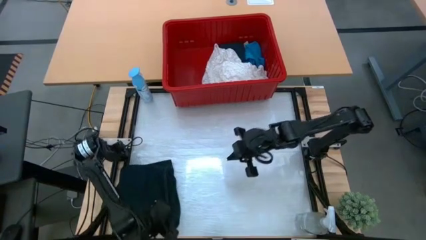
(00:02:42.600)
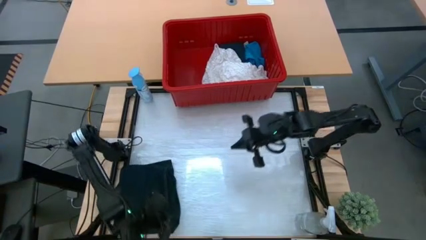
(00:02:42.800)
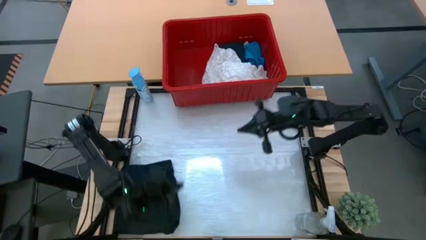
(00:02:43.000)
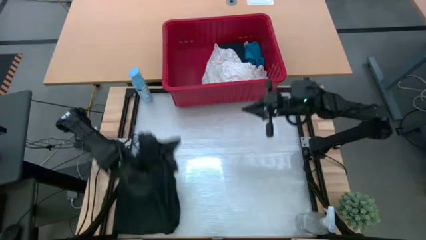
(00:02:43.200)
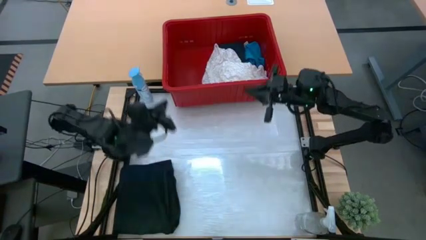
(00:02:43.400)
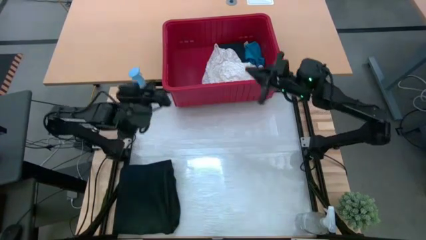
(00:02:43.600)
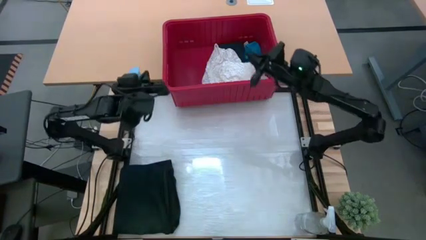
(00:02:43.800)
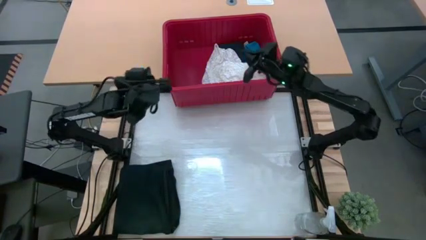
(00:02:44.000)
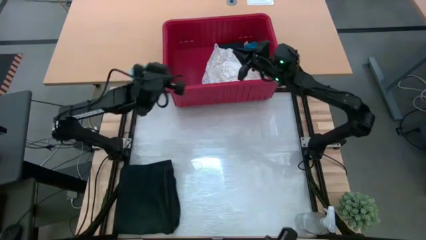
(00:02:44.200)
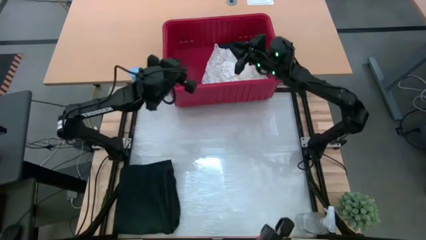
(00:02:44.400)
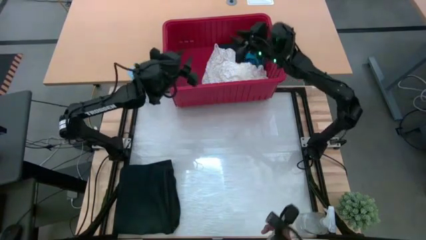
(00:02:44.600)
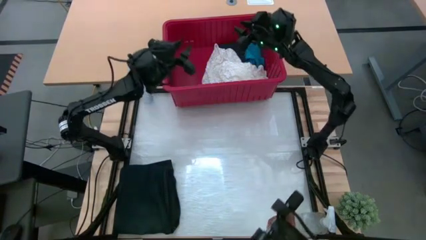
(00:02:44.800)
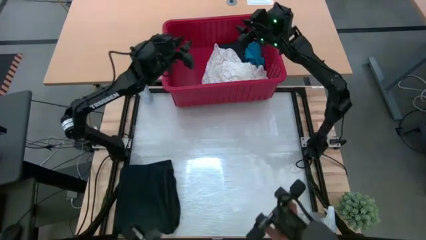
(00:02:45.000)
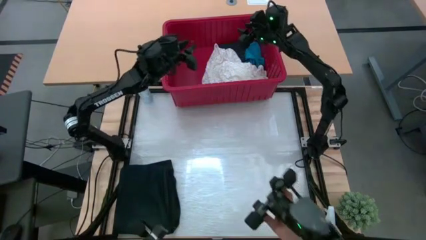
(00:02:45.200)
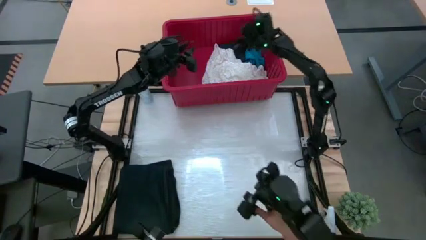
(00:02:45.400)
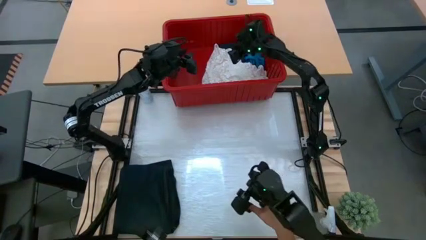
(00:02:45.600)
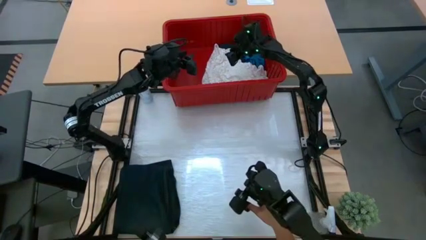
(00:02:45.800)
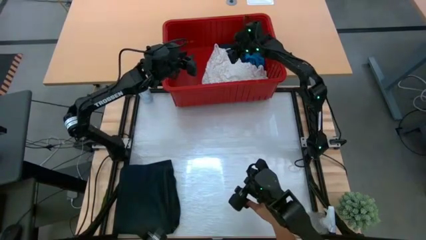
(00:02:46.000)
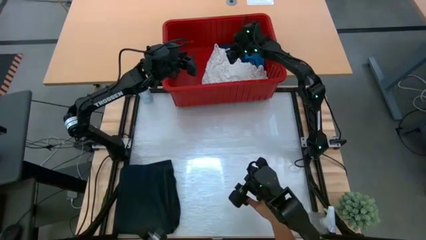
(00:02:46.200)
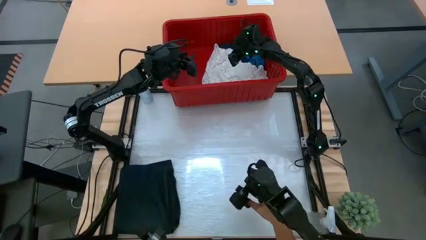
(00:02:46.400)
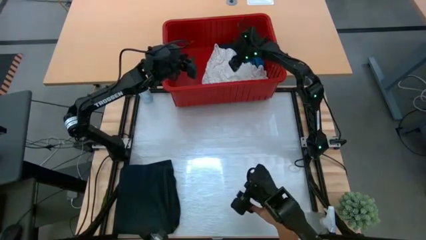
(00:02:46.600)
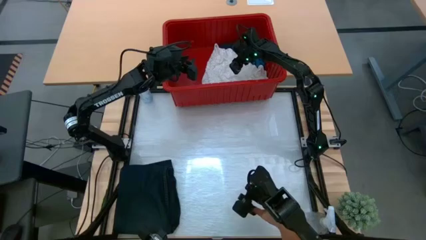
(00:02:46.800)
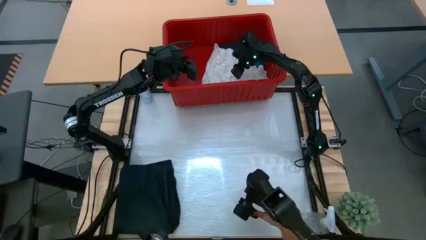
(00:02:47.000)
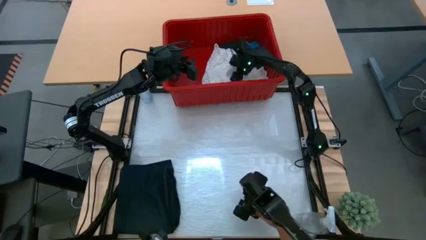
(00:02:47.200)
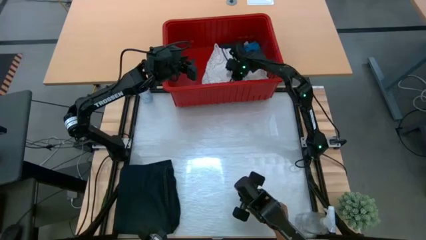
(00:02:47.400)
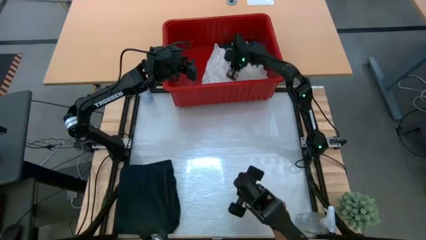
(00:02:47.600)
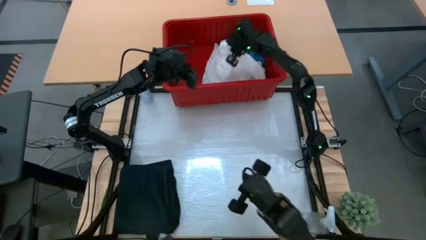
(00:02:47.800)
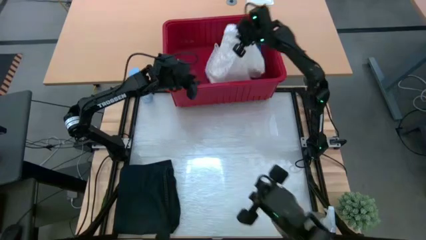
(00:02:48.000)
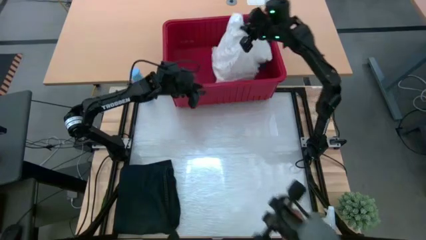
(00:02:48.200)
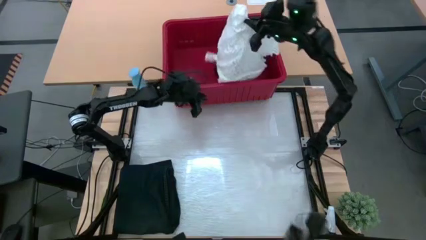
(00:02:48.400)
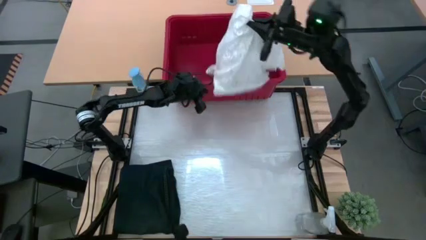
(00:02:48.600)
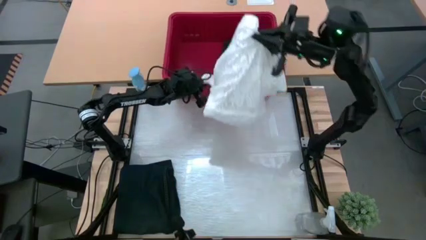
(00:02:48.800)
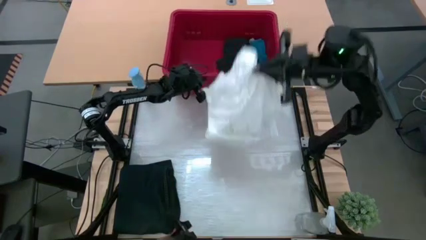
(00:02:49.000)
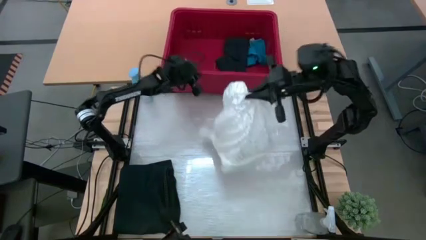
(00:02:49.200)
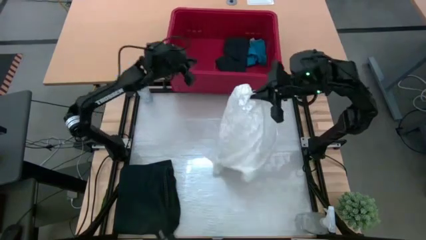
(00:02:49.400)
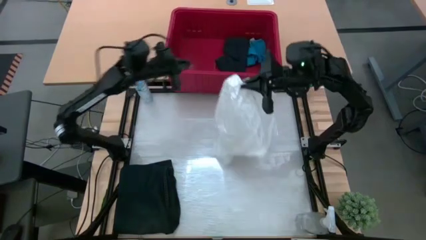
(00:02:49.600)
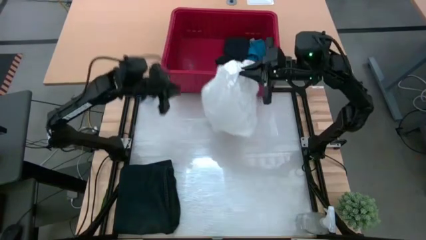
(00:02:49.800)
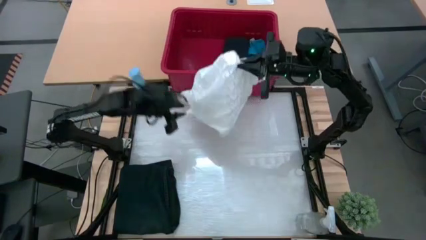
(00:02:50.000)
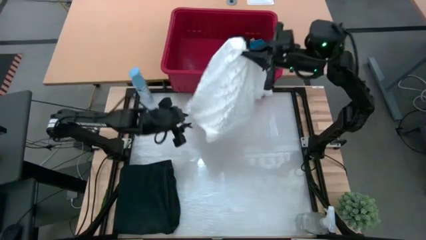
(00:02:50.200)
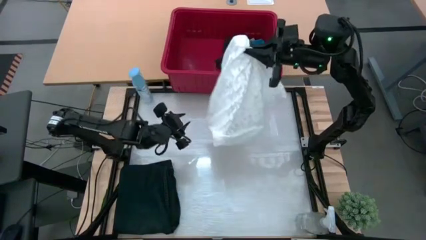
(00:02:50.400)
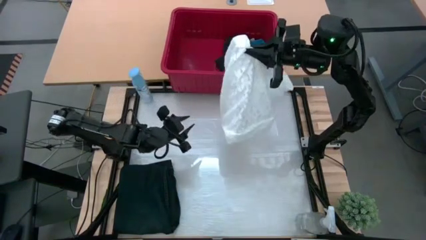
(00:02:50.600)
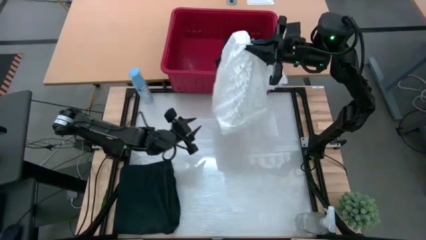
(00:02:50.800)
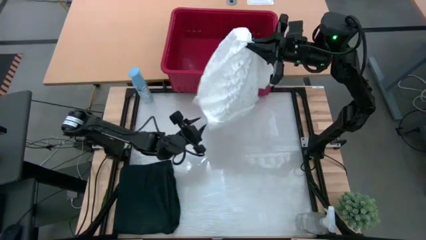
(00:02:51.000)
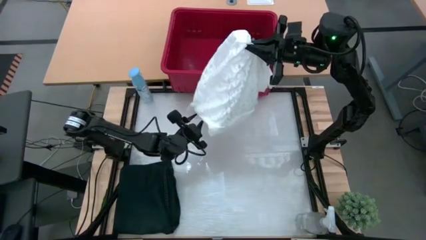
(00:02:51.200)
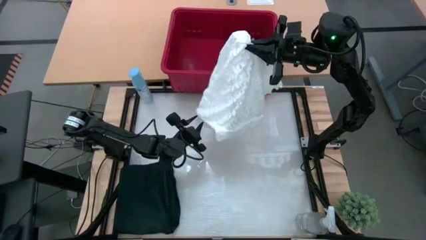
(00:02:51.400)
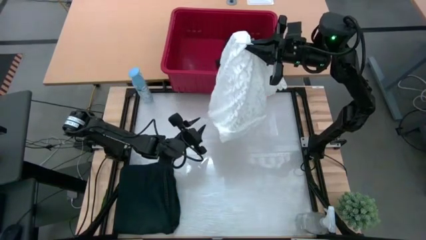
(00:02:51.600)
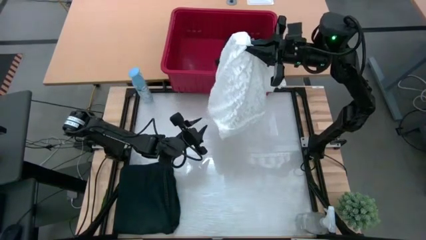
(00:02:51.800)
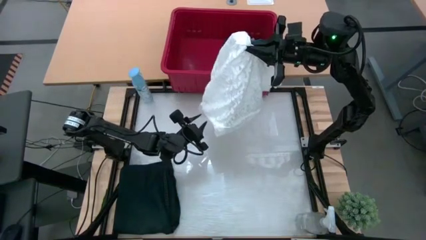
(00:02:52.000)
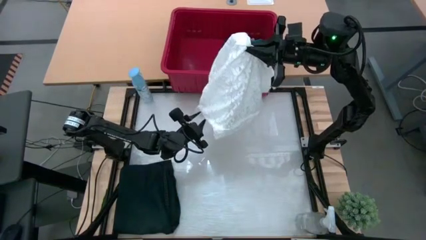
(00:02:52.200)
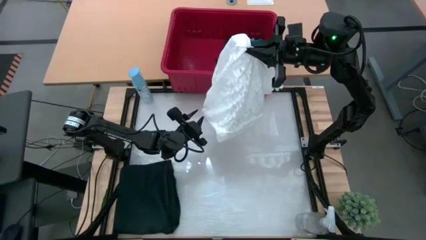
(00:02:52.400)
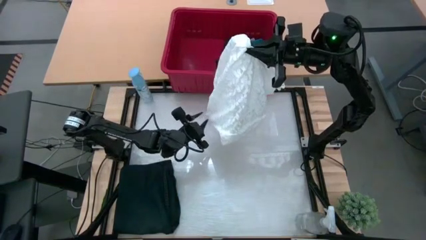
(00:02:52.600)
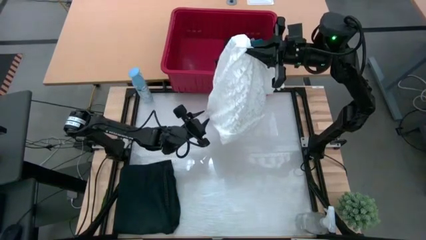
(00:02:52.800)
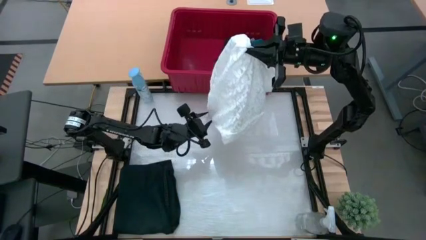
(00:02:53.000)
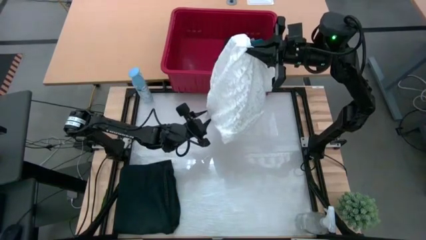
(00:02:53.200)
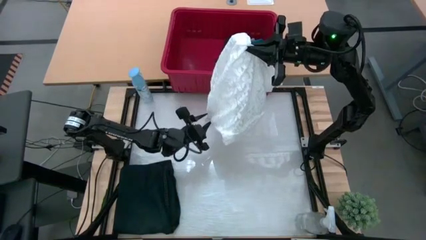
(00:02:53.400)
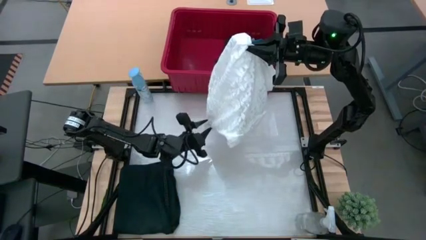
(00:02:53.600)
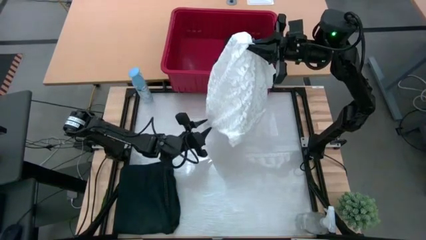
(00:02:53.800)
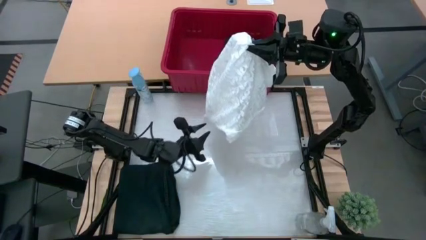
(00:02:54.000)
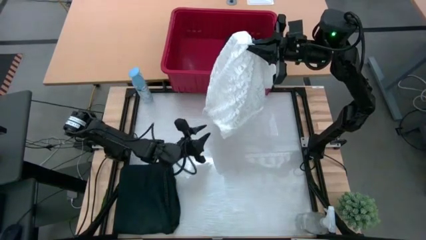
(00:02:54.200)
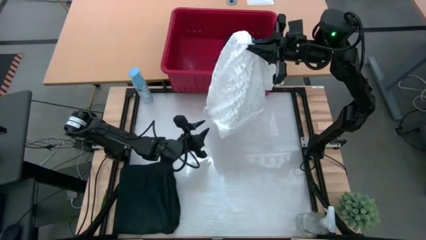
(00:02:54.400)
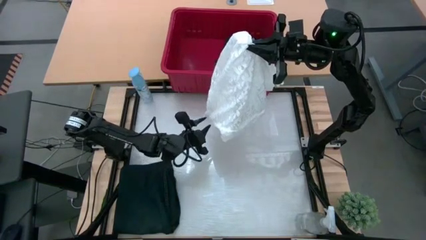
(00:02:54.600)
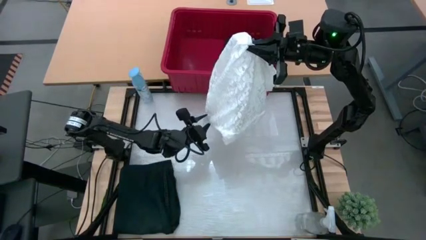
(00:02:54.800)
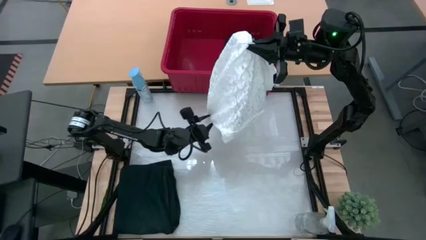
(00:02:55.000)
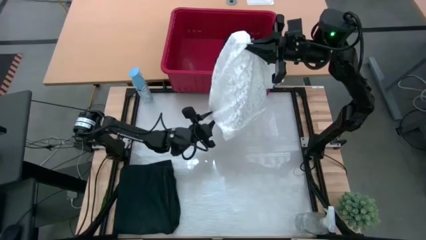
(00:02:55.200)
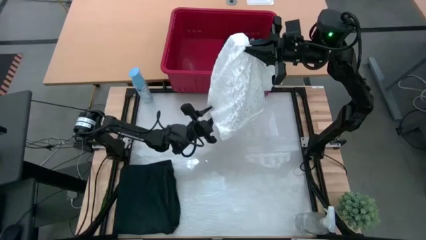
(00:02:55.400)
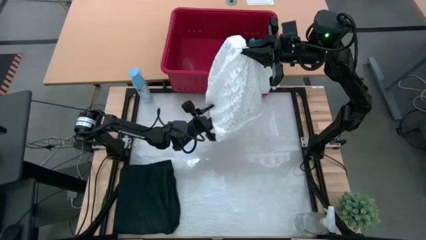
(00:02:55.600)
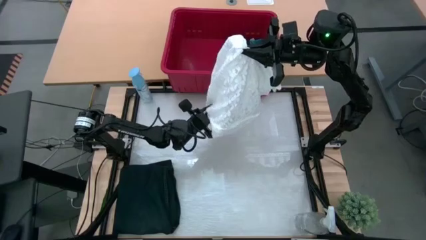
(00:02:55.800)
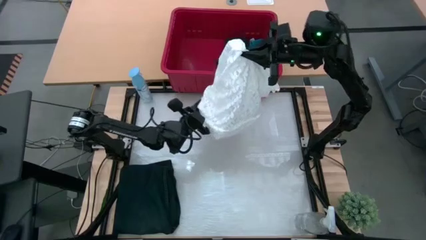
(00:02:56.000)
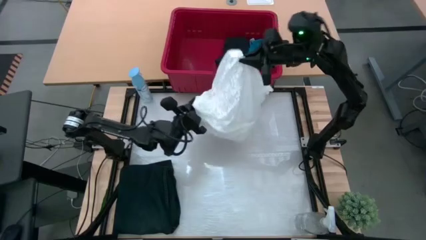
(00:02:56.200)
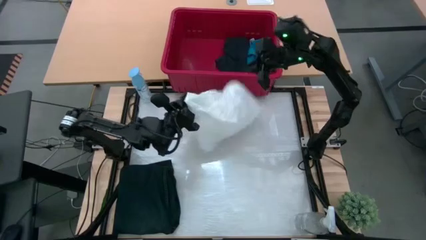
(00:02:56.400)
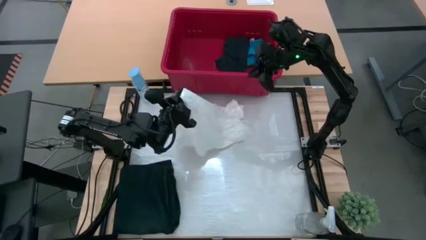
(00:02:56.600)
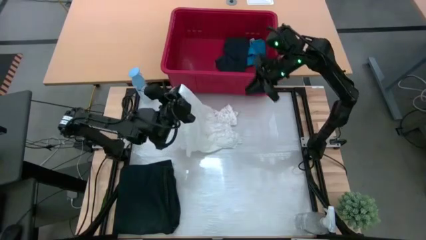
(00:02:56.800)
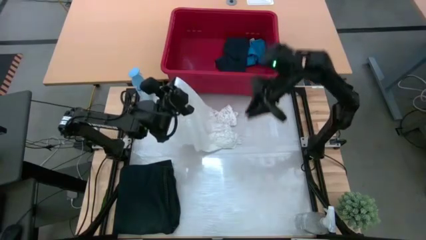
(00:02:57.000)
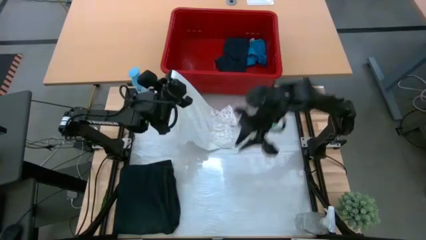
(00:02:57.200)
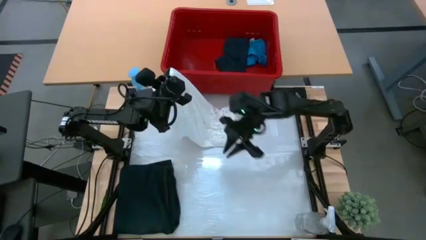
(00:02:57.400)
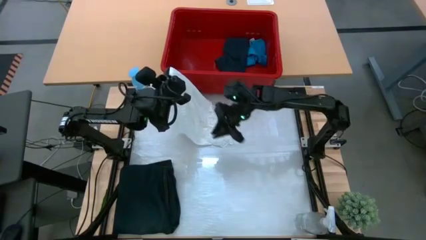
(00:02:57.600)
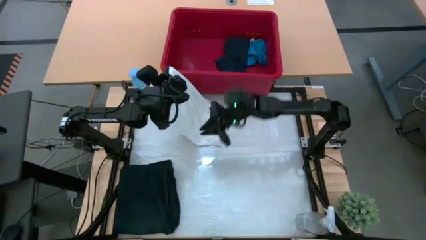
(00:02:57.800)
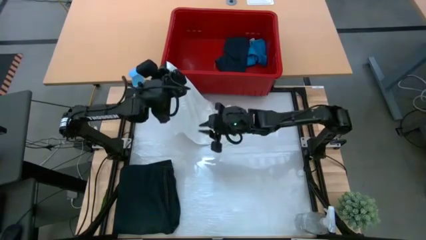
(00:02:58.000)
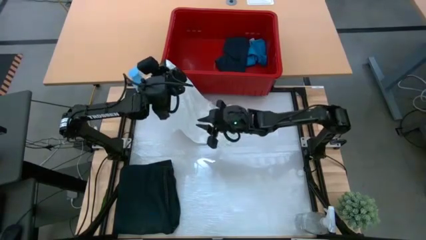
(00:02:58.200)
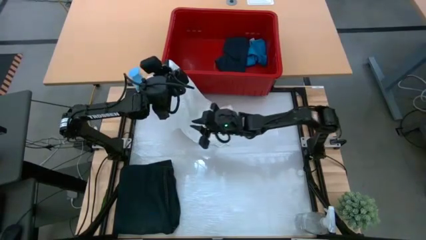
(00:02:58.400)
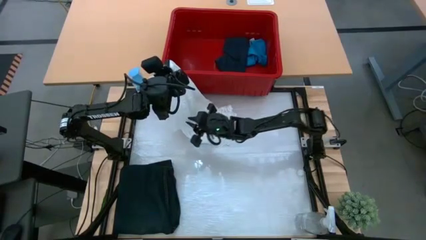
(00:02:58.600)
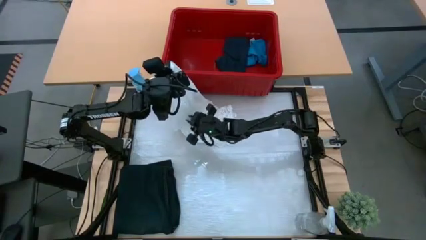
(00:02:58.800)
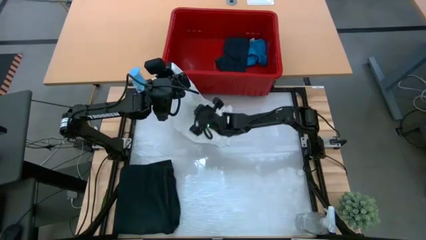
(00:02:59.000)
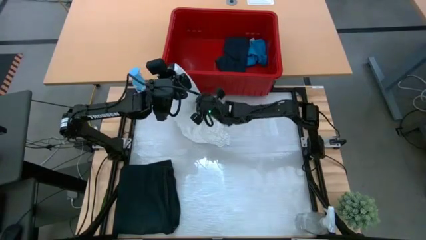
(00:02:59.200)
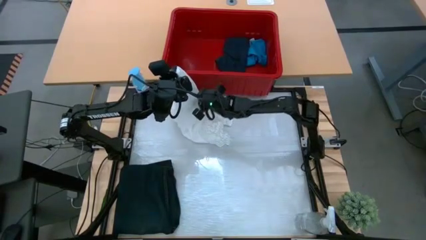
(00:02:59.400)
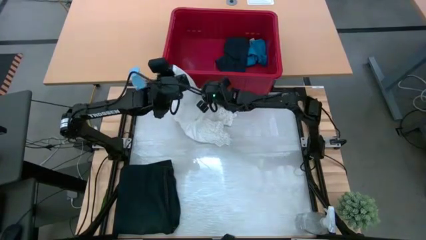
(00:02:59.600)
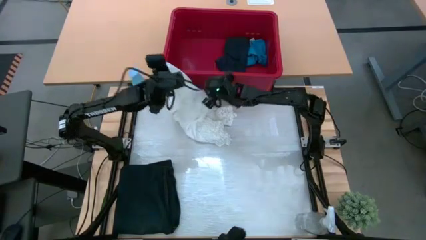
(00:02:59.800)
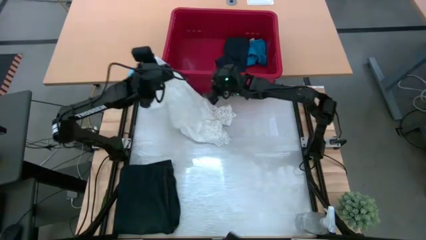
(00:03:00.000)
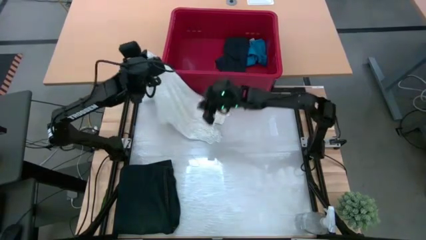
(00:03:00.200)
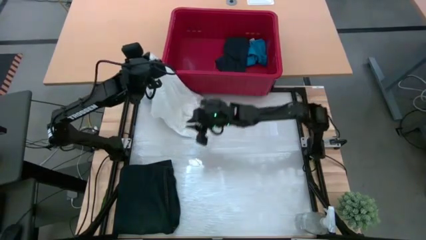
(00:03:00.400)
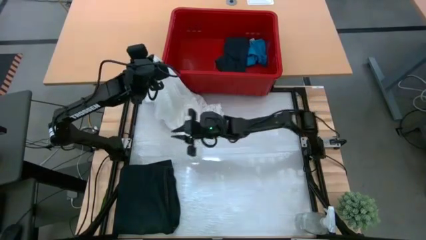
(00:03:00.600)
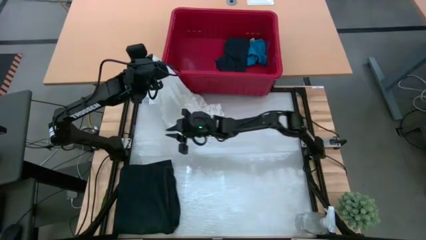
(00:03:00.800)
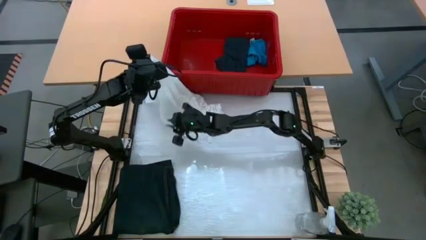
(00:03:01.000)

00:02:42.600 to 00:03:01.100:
Task: Fold Laundry from Bin
Fold the white dress from the red bin
